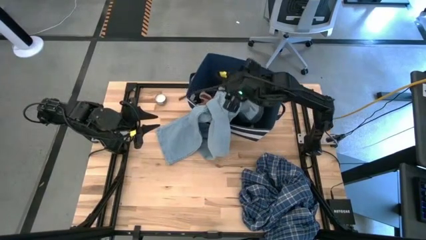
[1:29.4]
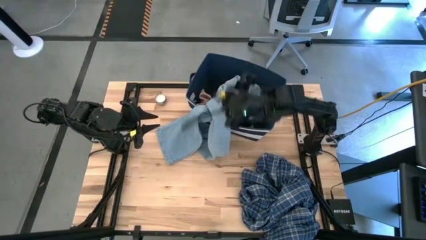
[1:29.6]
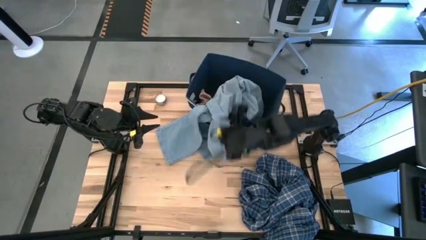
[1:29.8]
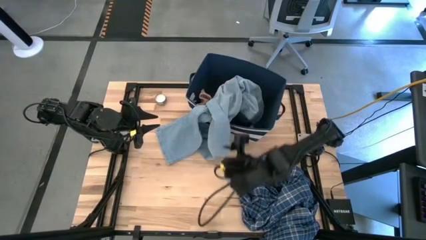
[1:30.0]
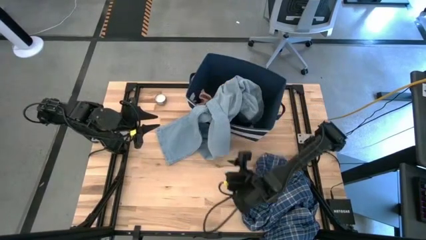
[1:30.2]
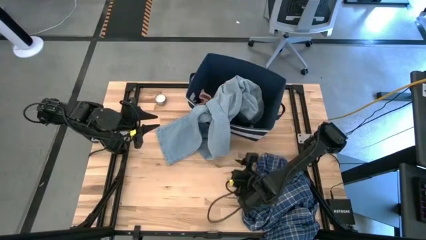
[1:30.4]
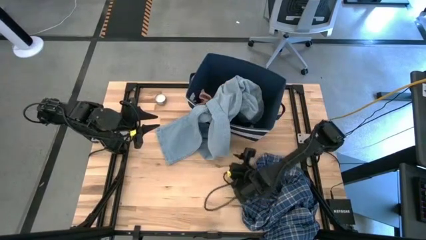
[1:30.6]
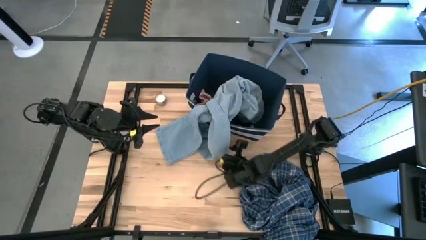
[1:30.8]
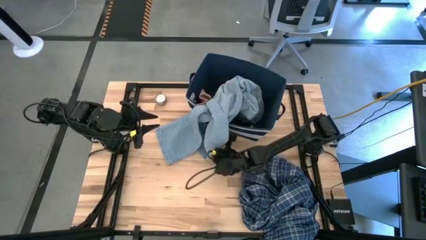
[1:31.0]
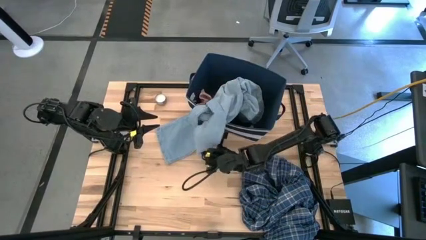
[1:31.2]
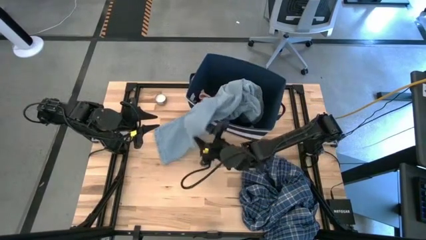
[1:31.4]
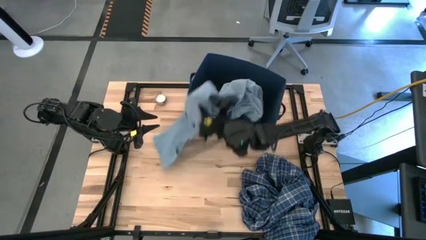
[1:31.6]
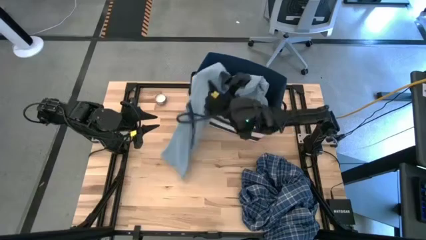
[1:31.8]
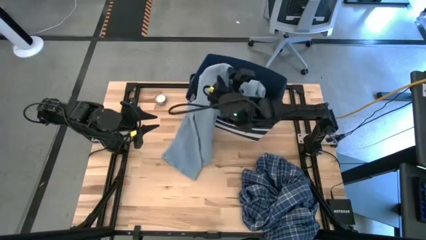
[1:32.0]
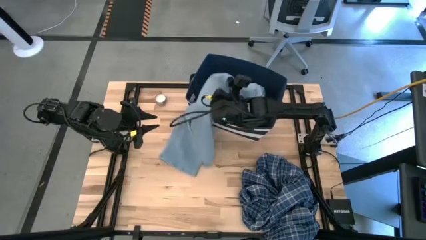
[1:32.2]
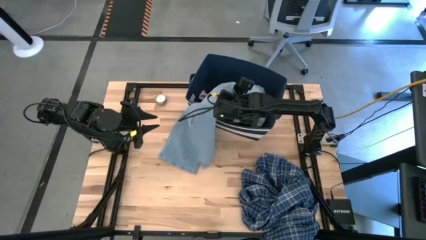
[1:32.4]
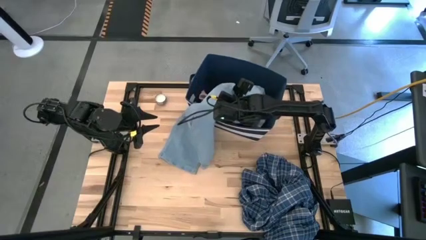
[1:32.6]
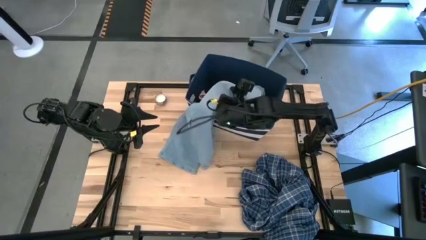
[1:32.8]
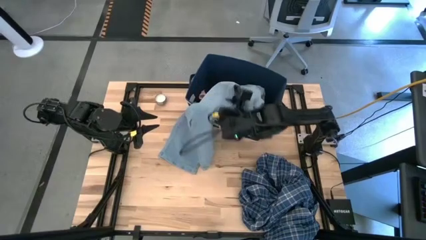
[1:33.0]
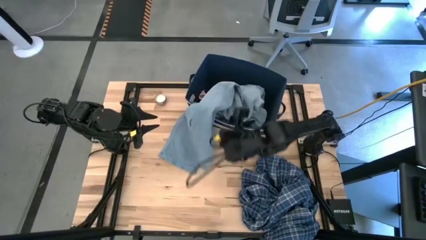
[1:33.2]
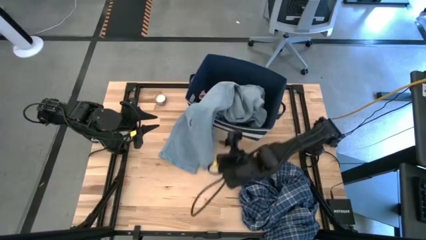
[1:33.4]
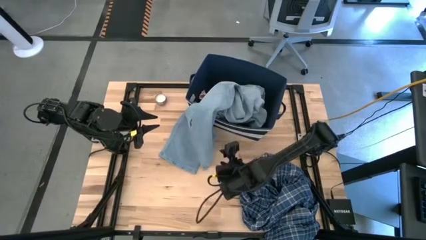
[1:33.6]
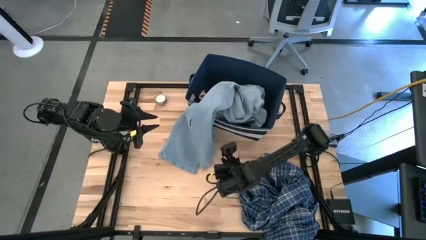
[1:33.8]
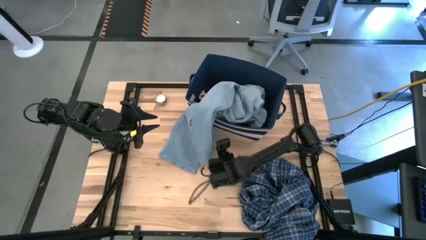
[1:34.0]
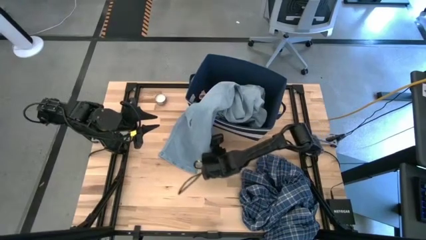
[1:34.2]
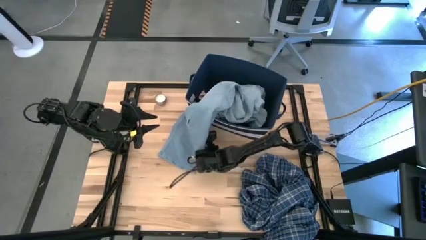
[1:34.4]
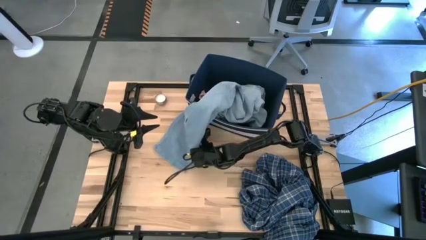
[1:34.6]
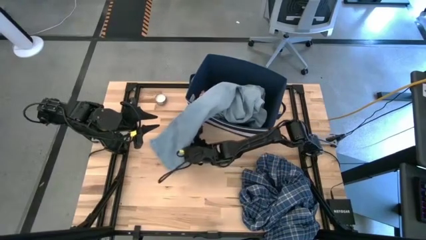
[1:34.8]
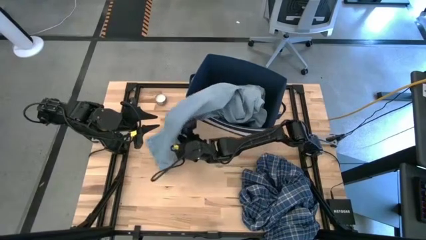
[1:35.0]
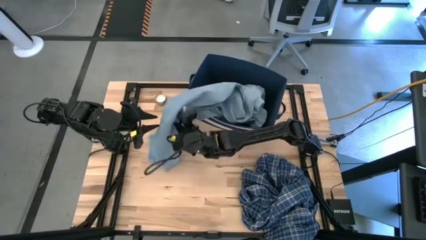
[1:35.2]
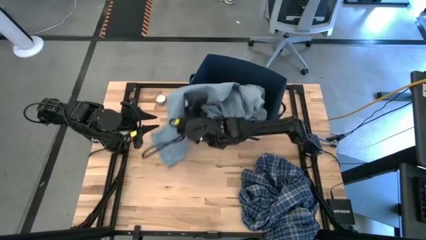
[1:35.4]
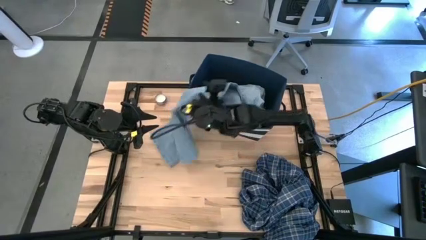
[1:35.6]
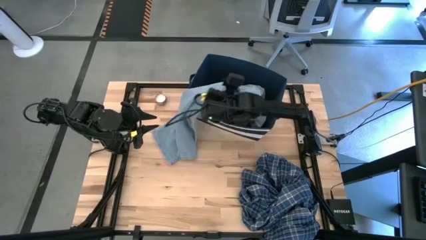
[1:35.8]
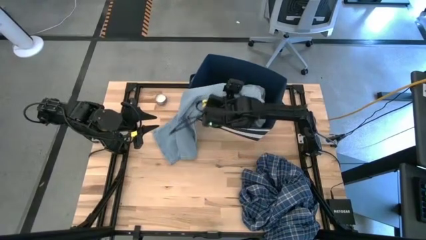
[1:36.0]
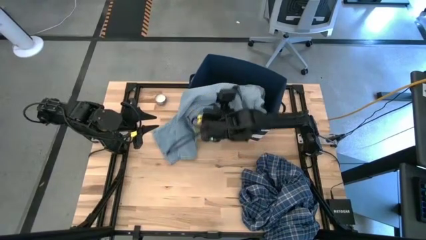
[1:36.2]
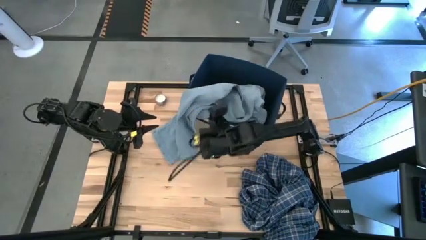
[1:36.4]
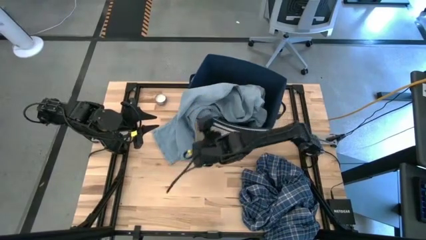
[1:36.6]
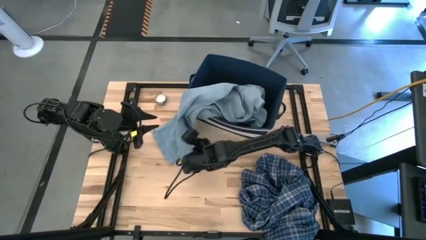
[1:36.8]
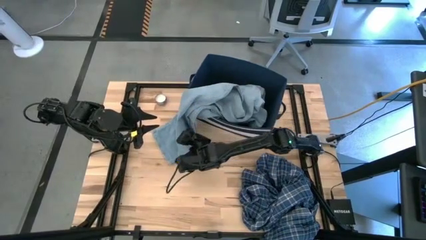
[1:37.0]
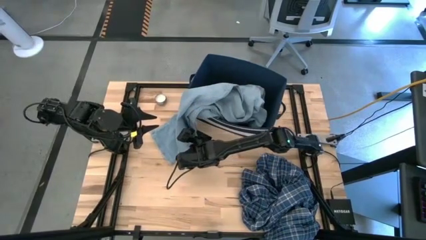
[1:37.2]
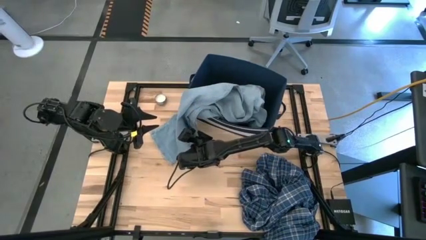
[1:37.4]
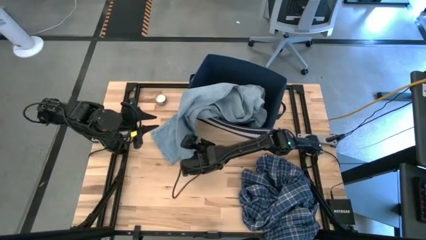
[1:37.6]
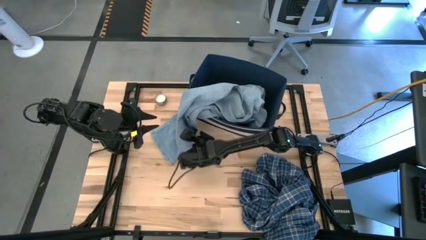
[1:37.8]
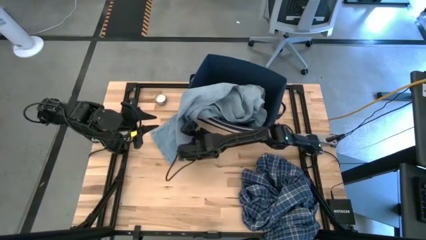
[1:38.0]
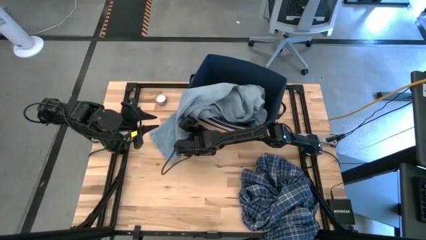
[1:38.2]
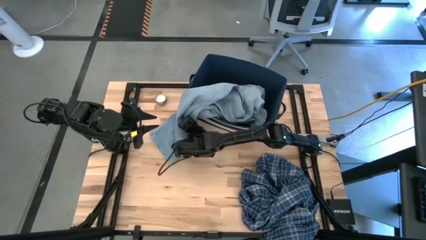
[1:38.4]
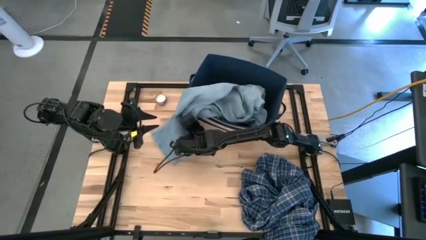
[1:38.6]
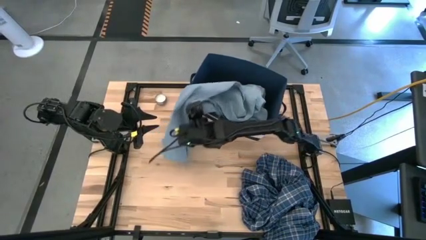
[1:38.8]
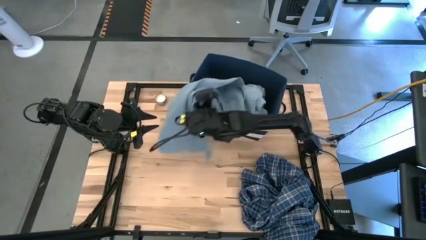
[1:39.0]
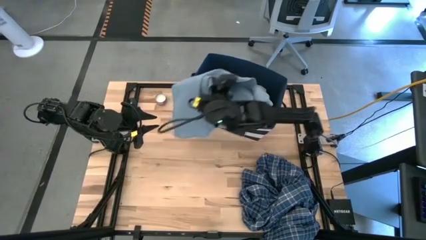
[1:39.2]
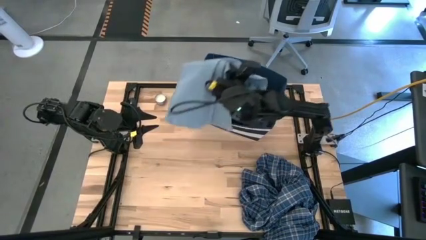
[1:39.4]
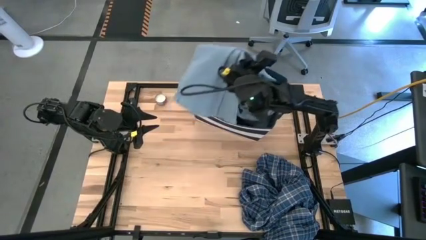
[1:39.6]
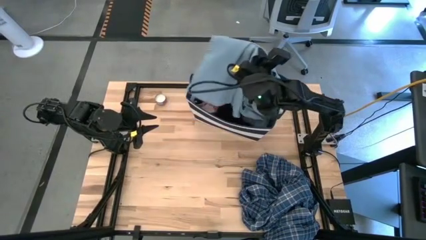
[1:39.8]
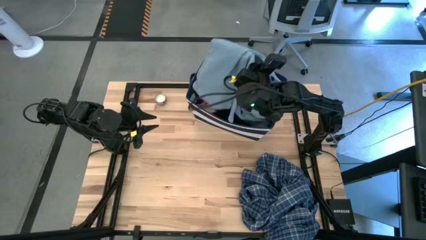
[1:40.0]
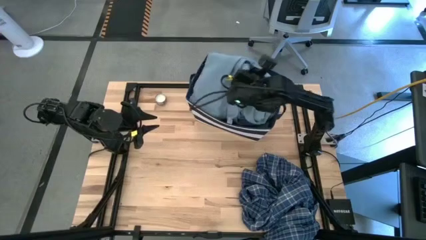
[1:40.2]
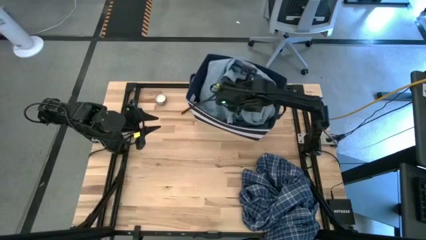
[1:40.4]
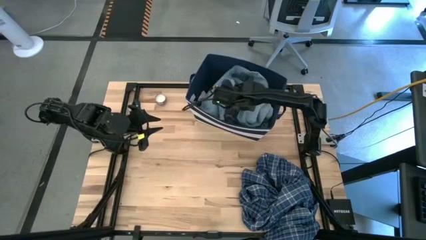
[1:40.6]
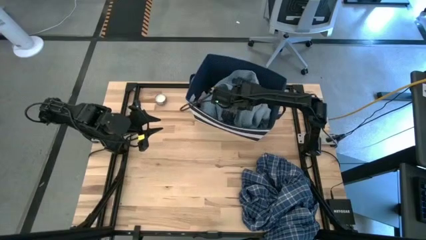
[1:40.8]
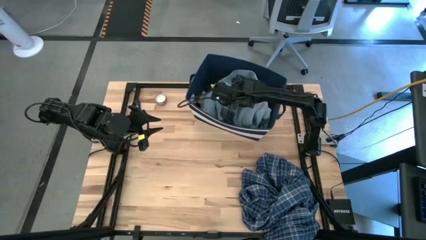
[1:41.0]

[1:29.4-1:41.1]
Task: Sort clothes
Put the light blue pants into the blue laundry organizer

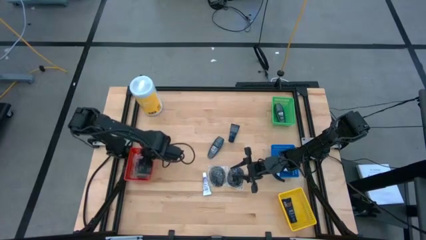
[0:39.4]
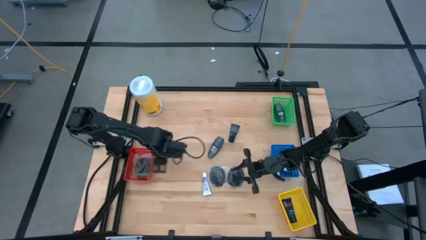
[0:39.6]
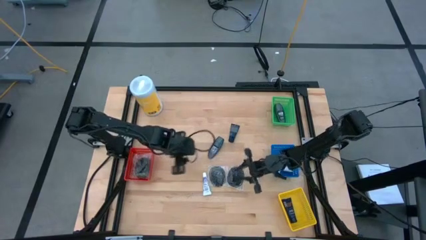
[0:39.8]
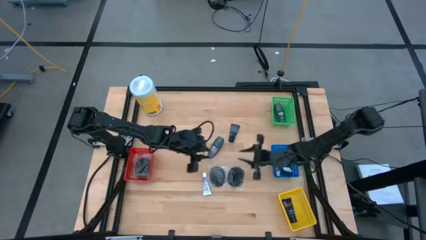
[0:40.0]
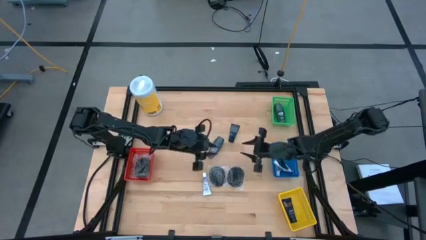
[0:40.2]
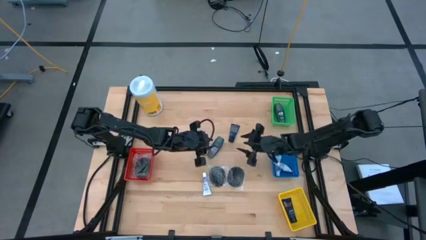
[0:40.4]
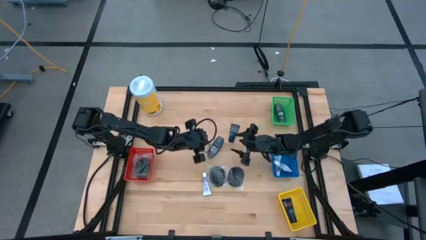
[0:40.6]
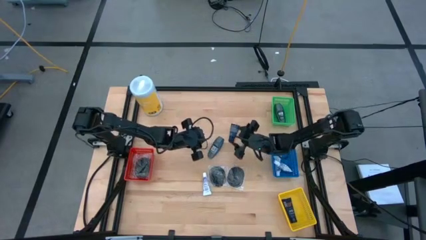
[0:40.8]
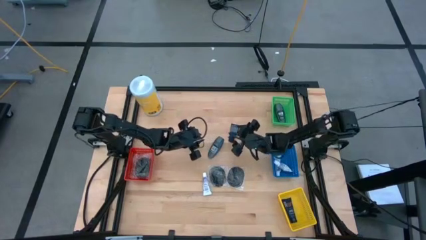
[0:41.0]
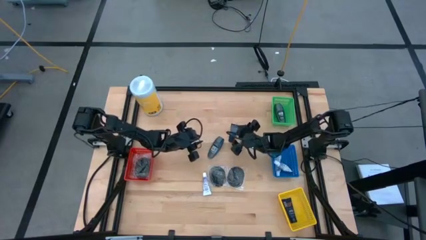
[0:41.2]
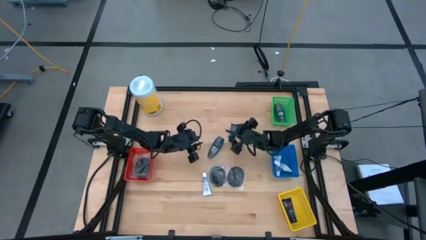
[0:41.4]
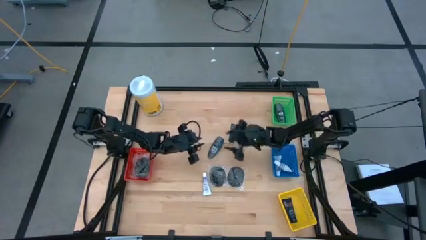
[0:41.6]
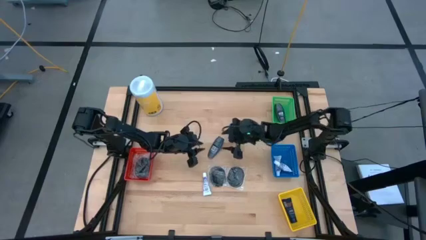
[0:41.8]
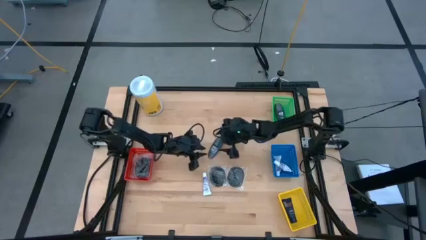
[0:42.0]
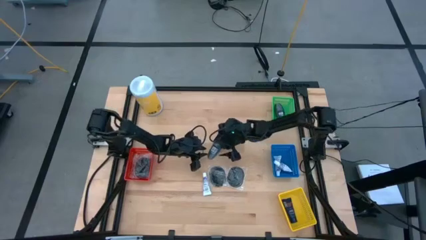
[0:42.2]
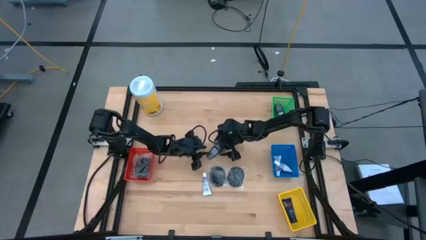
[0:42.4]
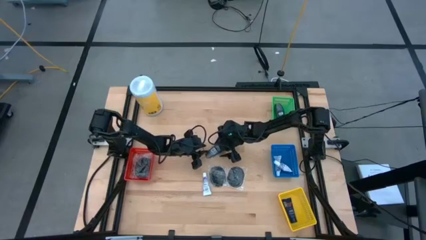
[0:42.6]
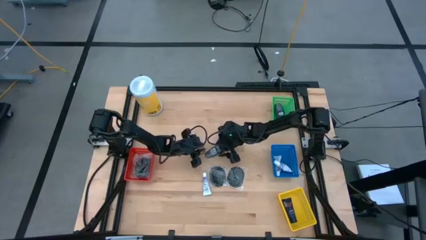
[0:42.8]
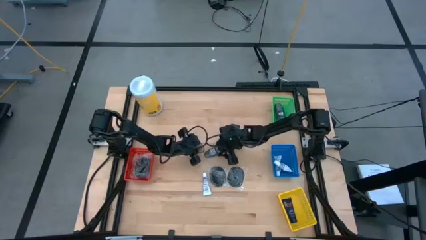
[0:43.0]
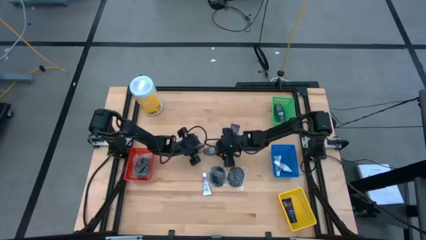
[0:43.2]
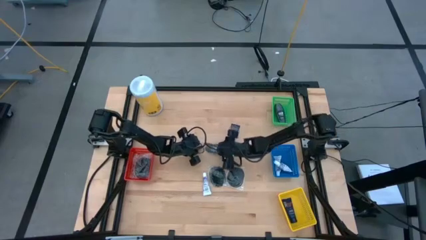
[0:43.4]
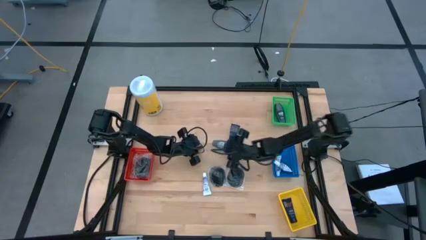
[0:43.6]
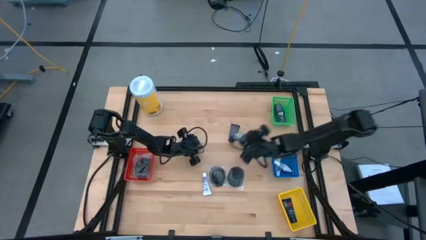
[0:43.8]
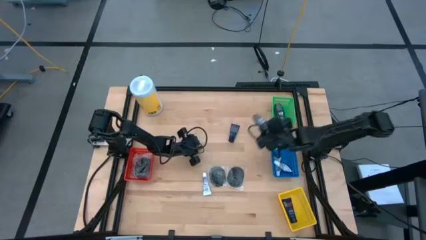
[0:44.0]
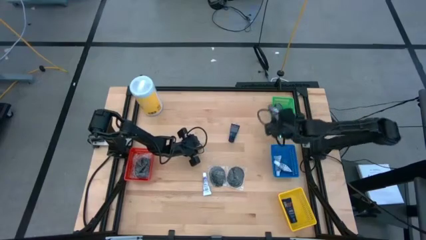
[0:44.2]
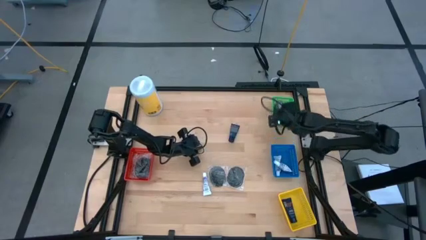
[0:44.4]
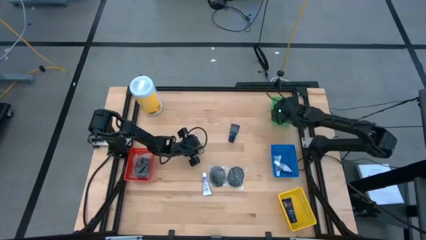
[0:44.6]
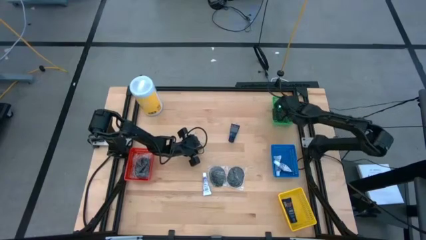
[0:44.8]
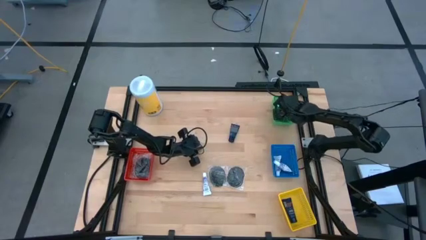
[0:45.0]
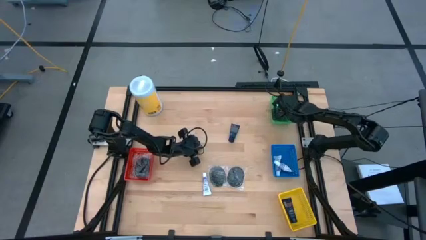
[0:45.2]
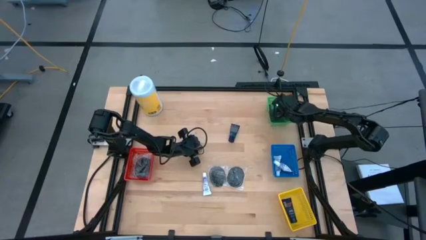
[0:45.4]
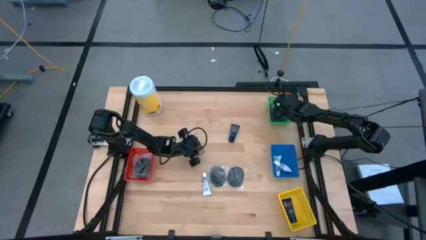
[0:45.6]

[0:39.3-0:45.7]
Task: Pick & Place Travel size toiletries
Put the deodorant into the green bin
